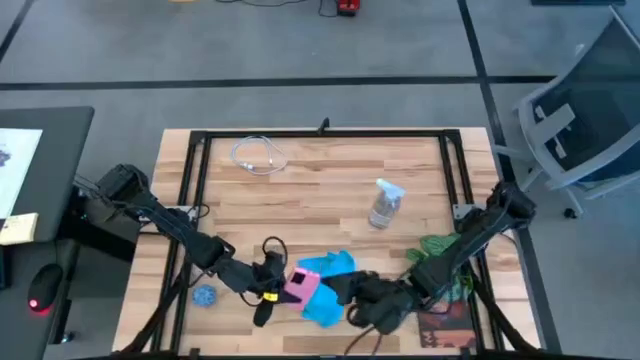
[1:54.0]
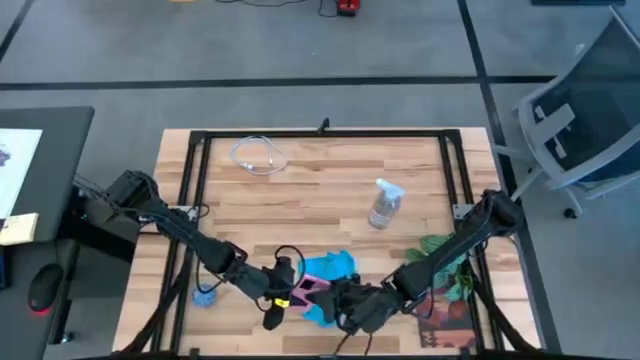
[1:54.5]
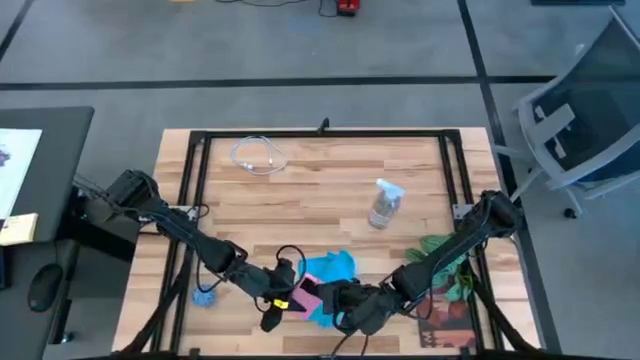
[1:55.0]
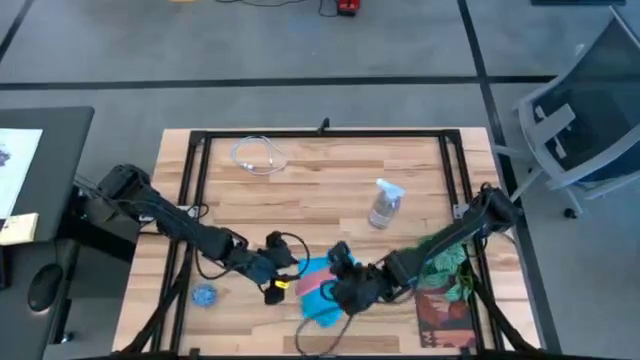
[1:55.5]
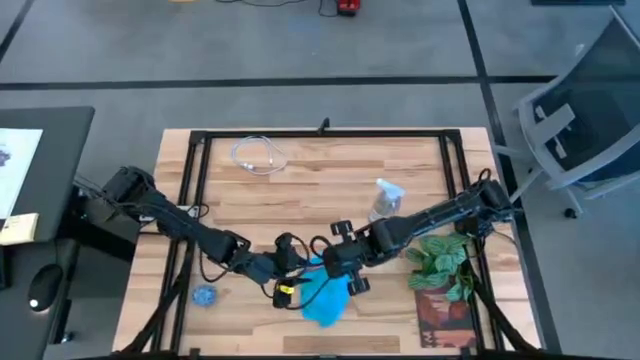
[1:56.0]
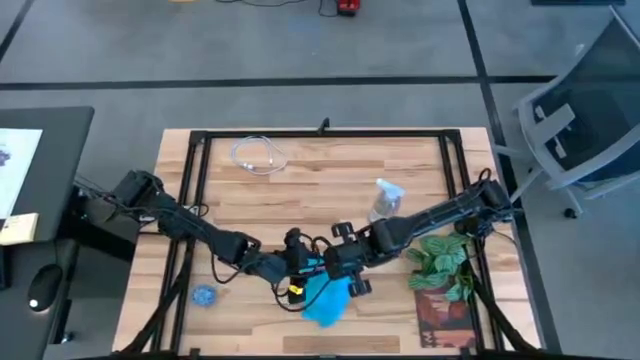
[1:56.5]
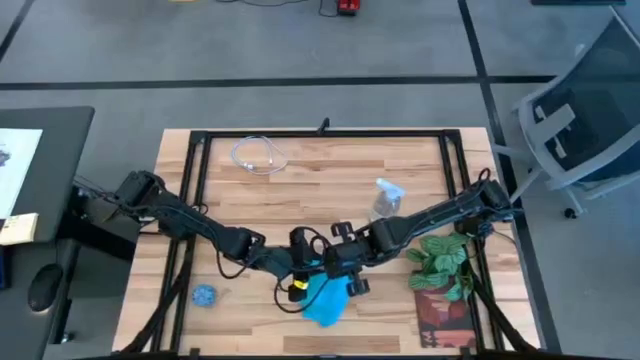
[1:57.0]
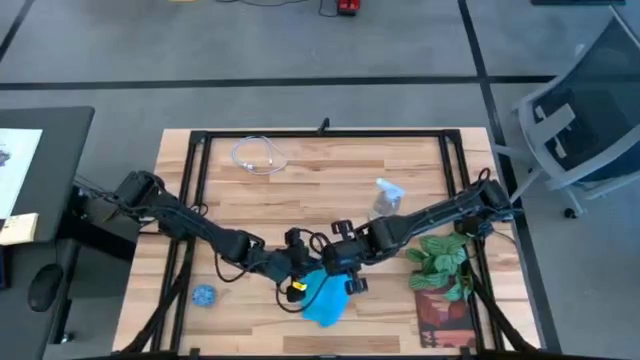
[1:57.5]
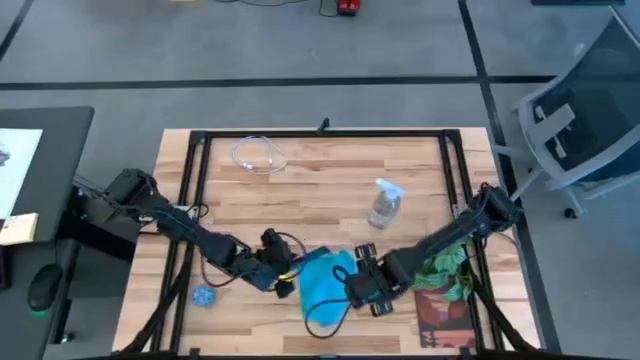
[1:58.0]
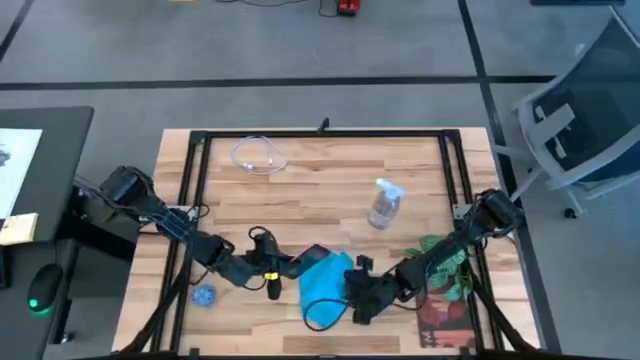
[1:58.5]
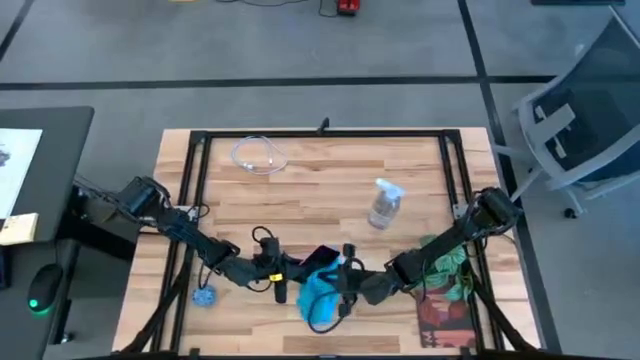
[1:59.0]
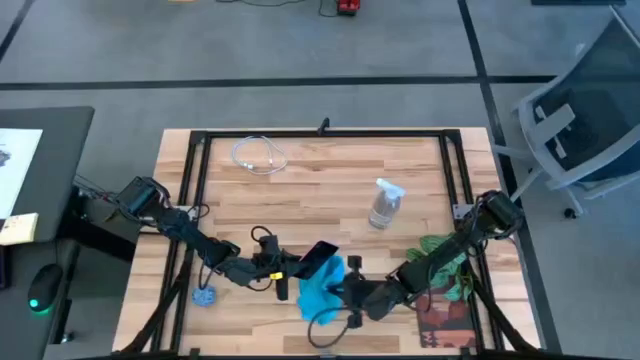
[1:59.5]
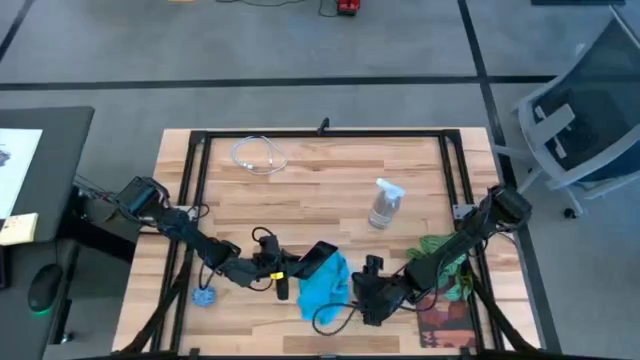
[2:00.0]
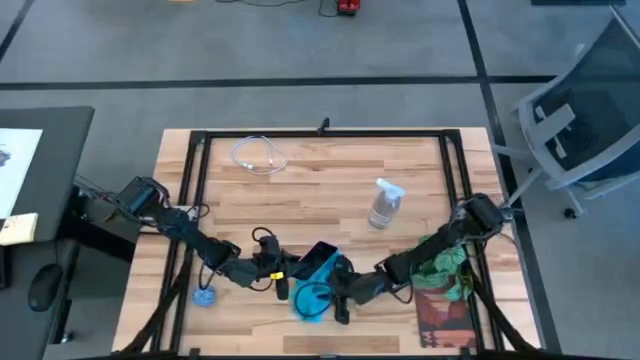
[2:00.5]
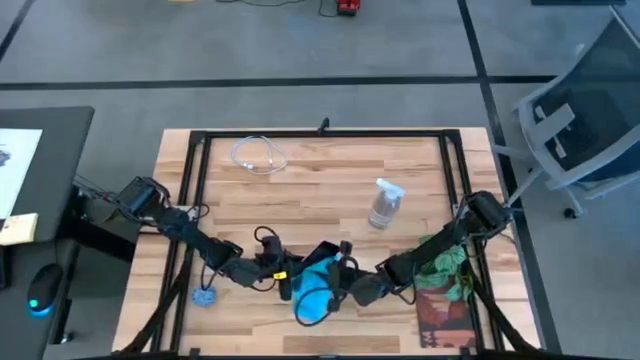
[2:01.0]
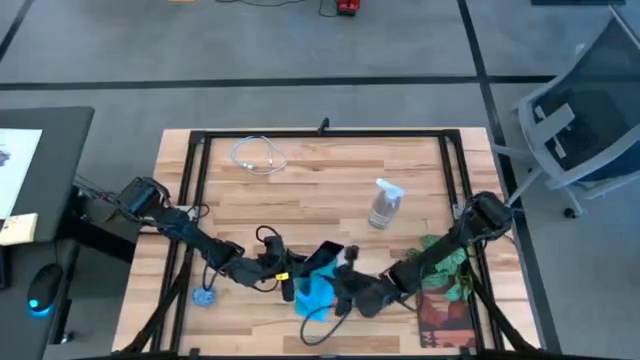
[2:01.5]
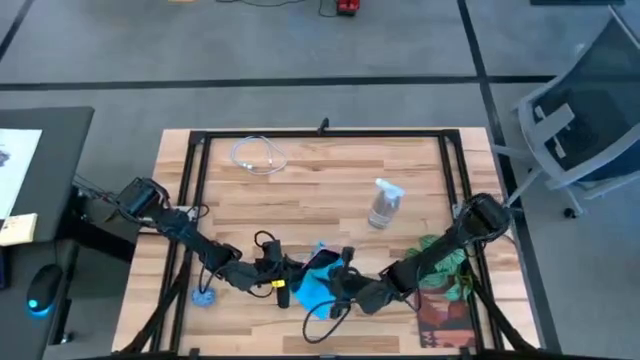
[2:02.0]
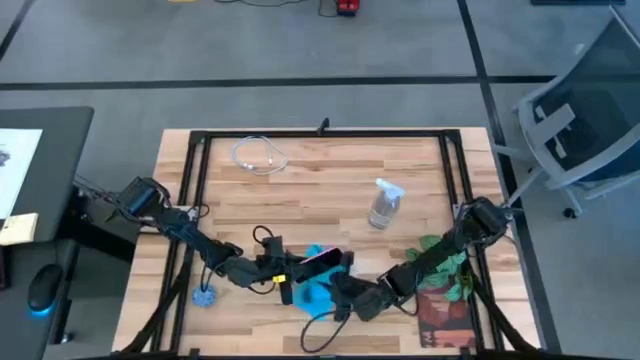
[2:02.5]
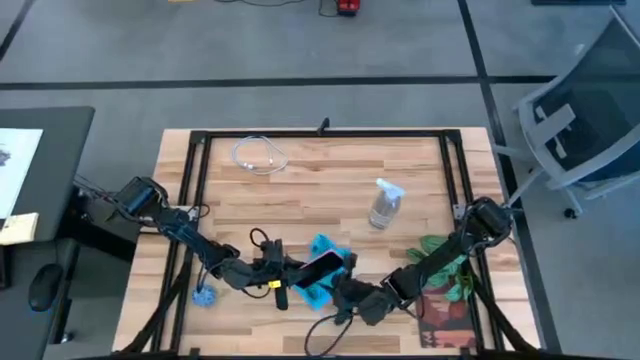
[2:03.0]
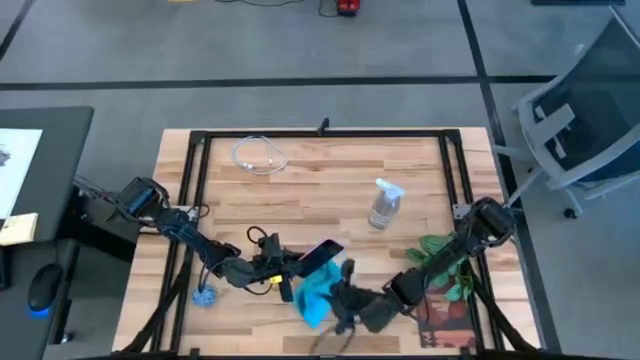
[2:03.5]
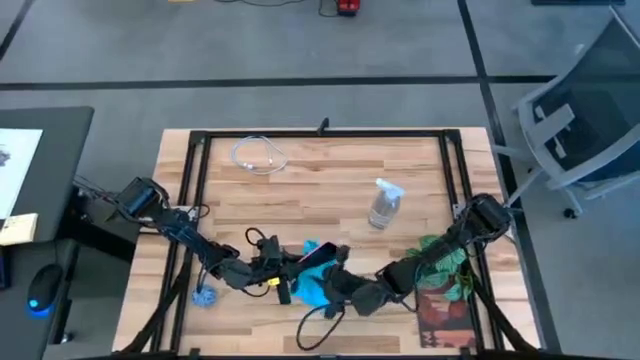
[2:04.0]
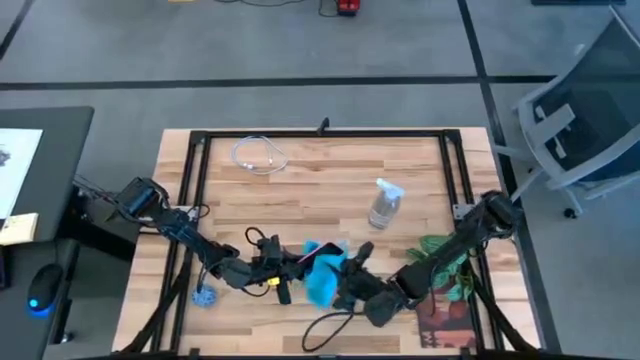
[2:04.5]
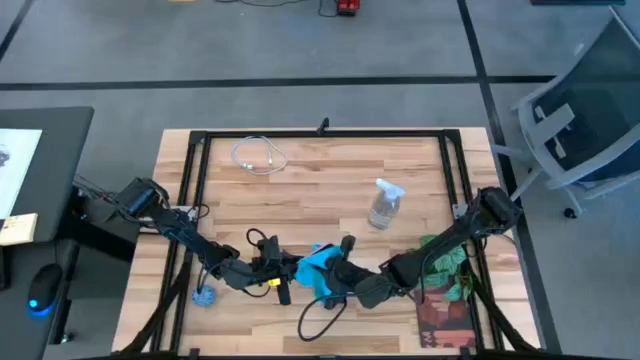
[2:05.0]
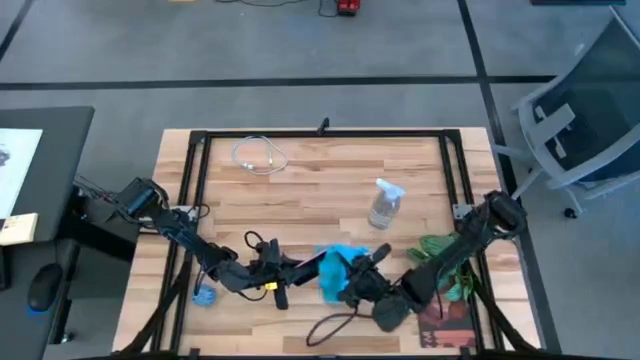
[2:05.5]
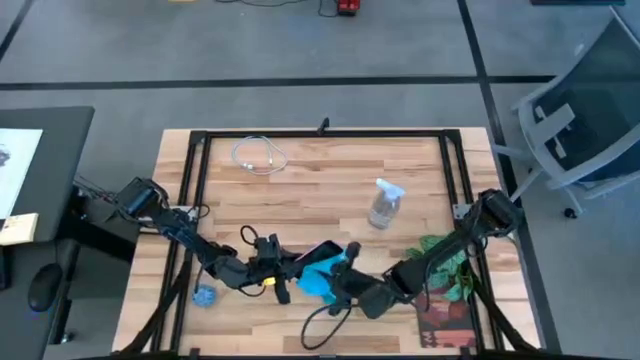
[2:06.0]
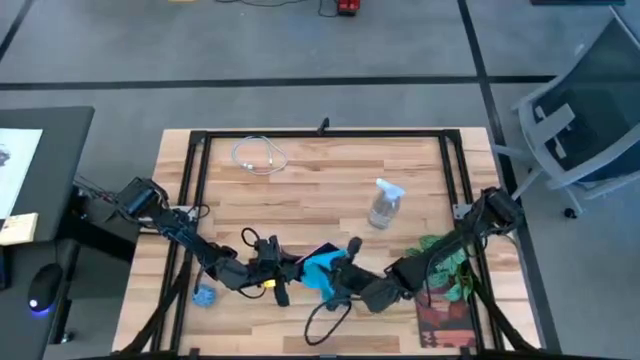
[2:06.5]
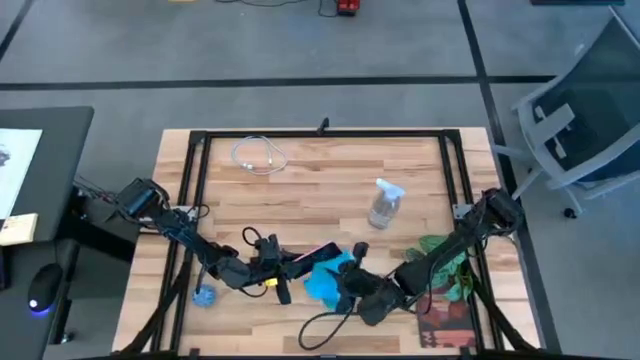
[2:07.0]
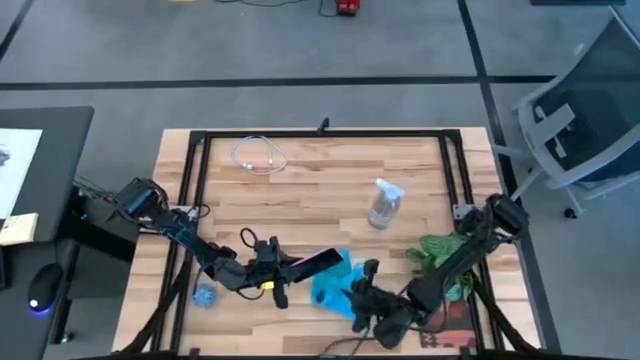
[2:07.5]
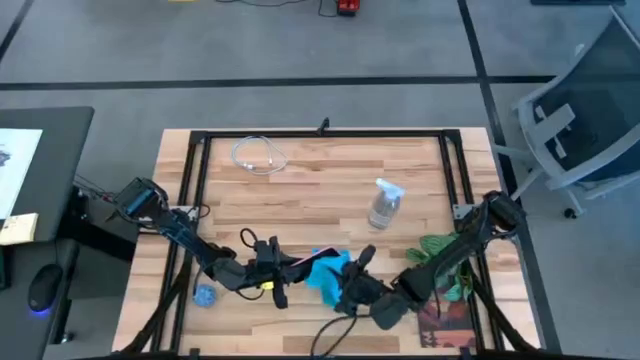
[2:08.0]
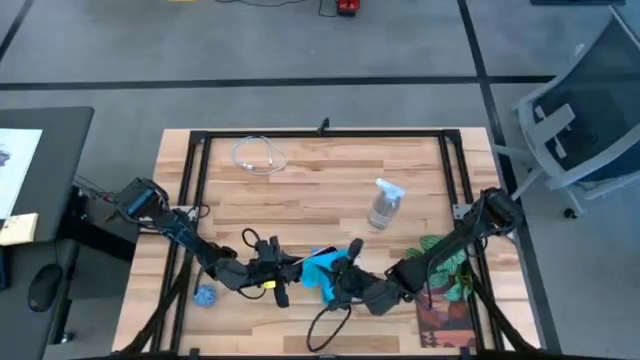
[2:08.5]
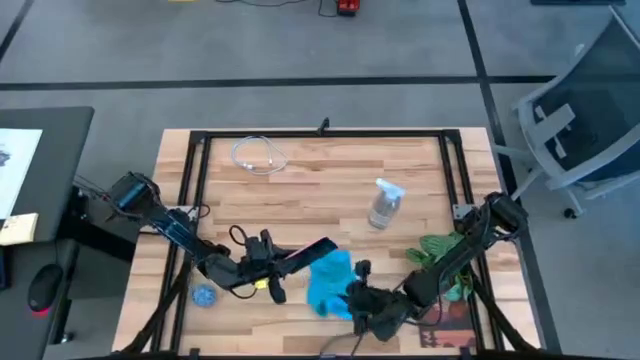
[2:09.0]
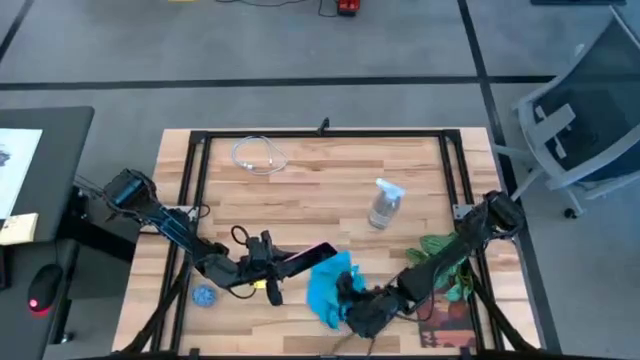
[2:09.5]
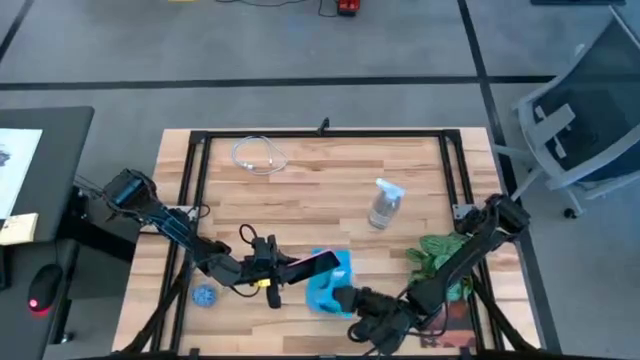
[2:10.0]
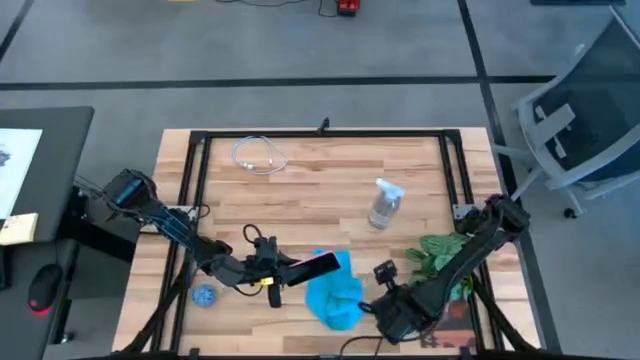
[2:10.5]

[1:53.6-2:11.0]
Task: Apply microfiber cloth
Wipe the front of the cellphone with a microfiber cloth

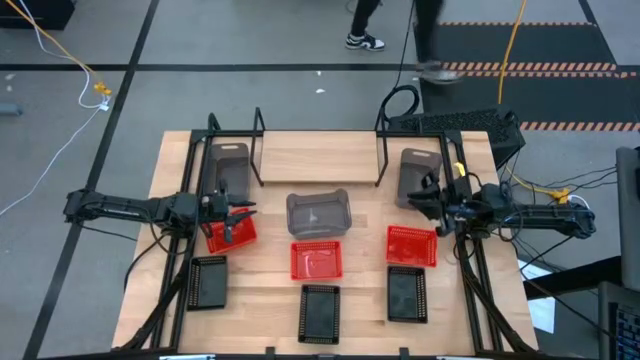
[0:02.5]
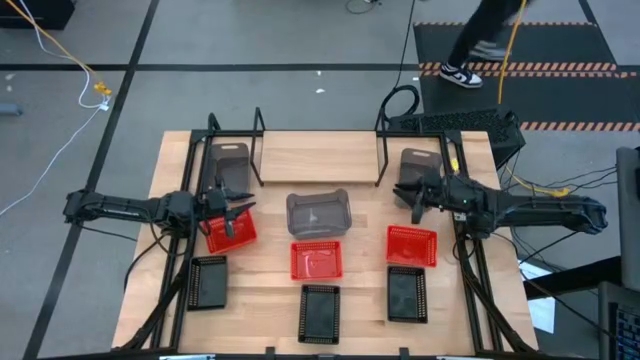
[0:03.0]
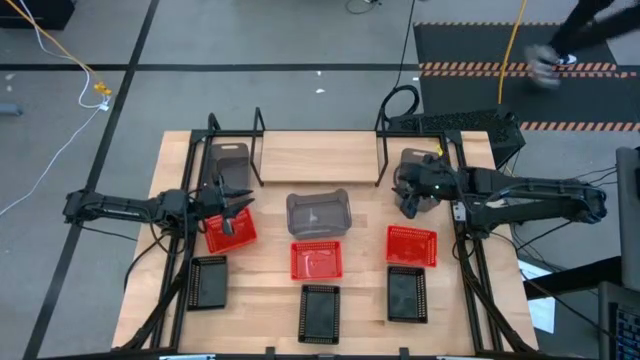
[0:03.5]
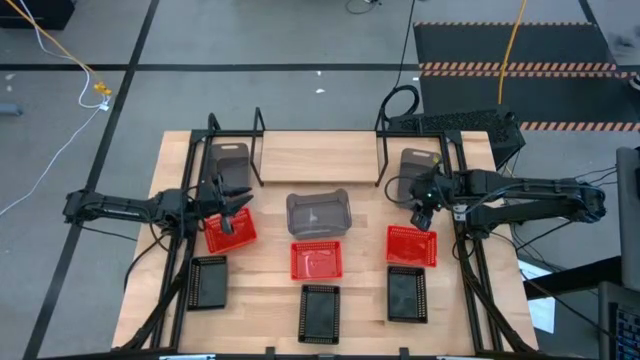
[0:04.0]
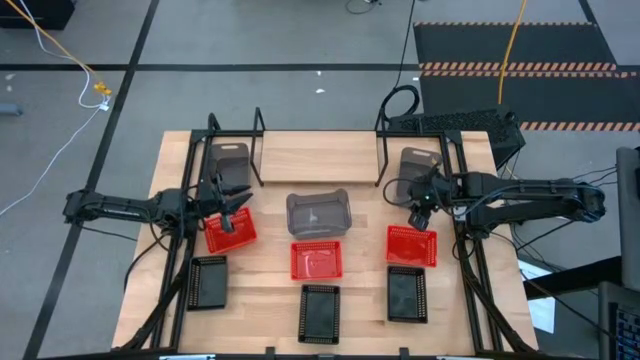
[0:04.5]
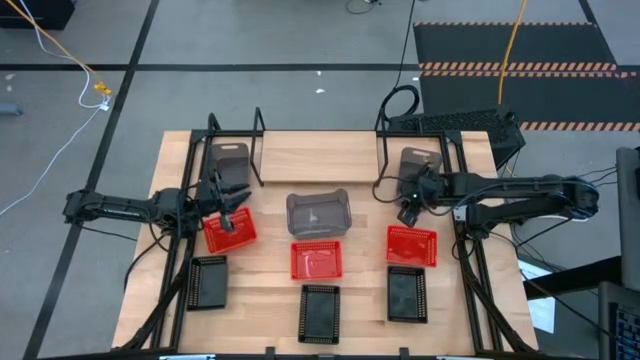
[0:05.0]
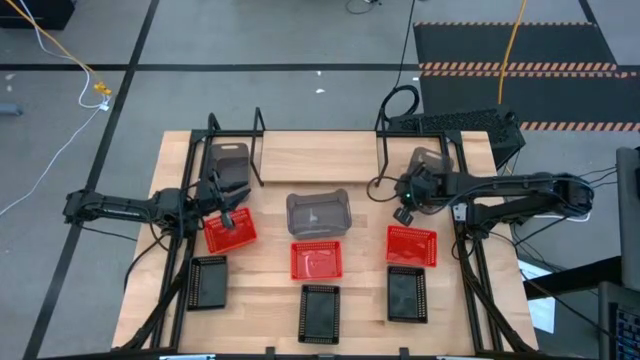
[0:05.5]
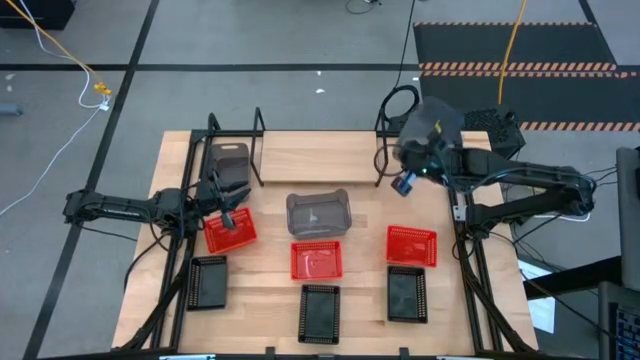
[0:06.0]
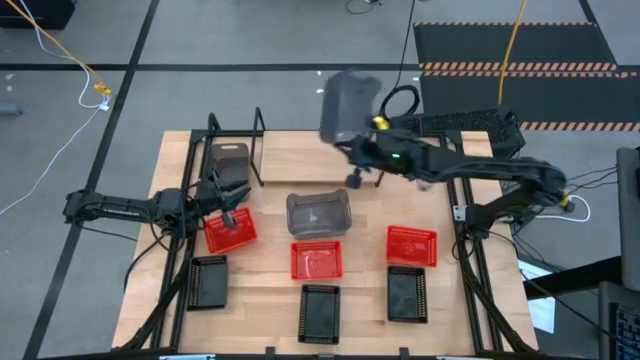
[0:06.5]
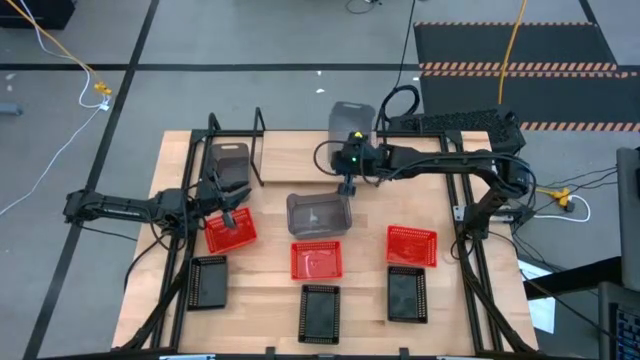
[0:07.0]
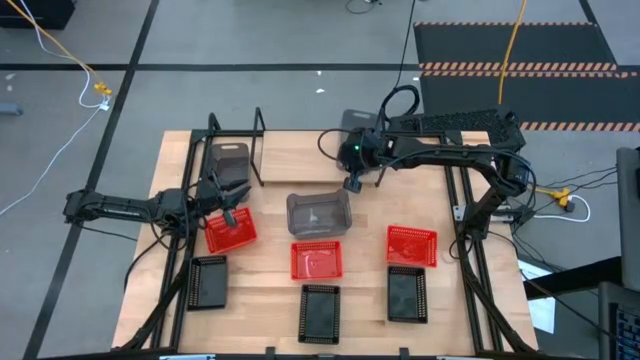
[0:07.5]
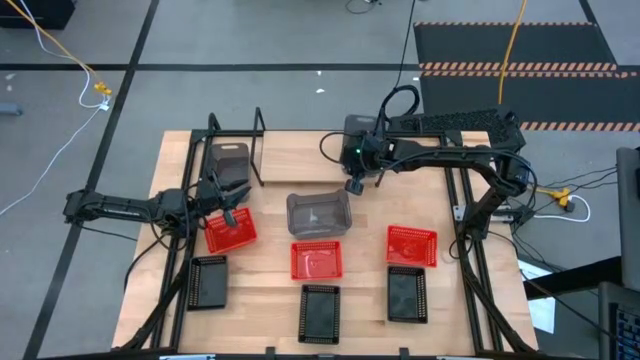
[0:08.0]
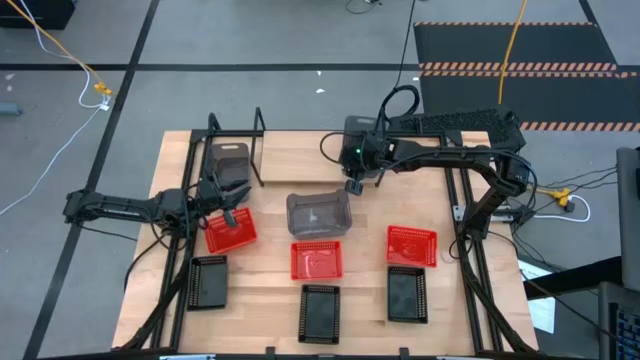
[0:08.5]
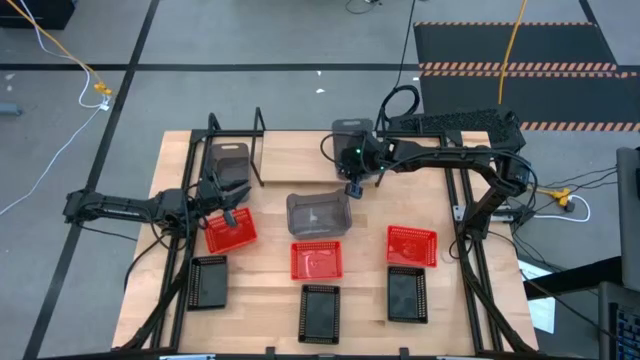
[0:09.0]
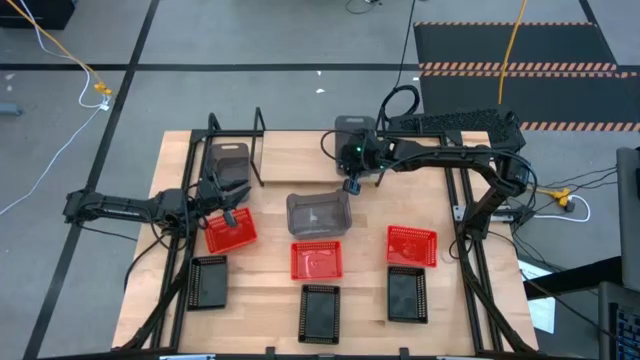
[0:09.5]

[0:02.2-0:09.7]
Task: Stack baskets on shelf by color
Put the right transparent black bin on the shelf
